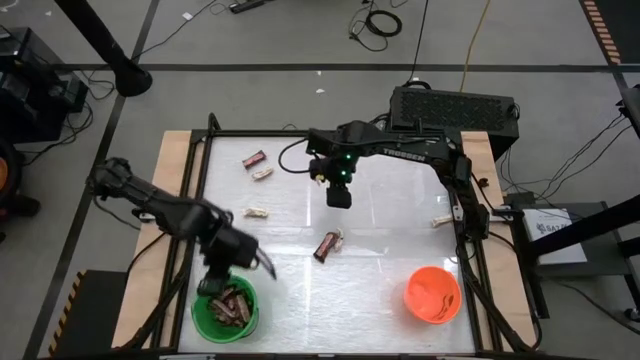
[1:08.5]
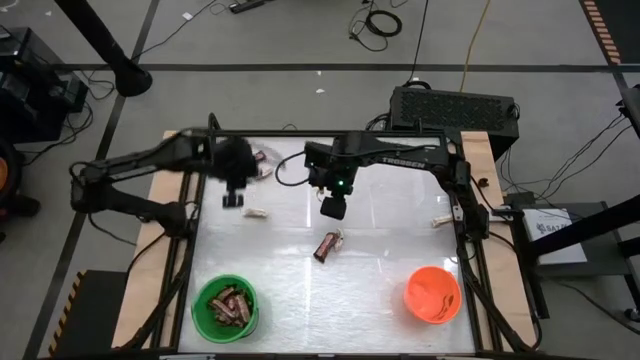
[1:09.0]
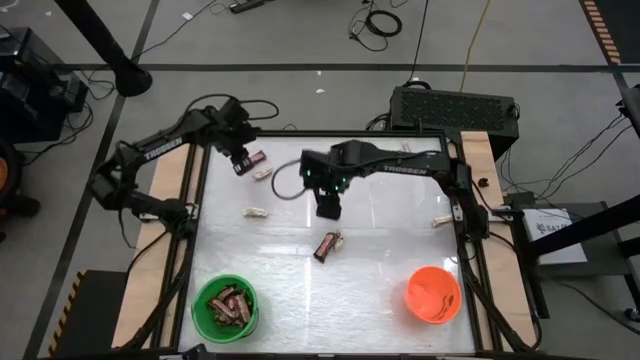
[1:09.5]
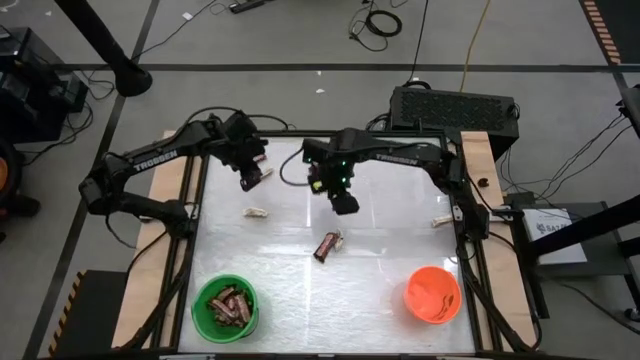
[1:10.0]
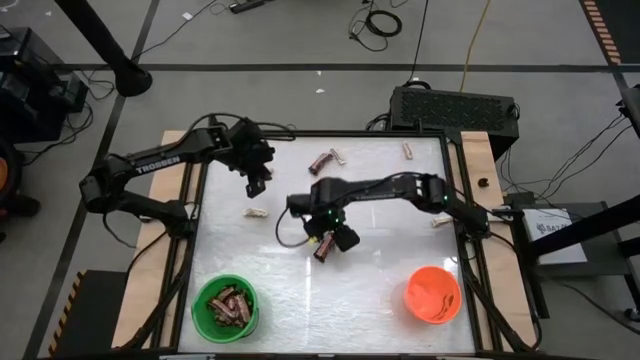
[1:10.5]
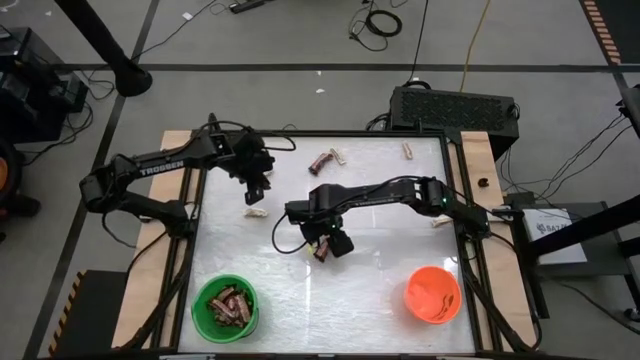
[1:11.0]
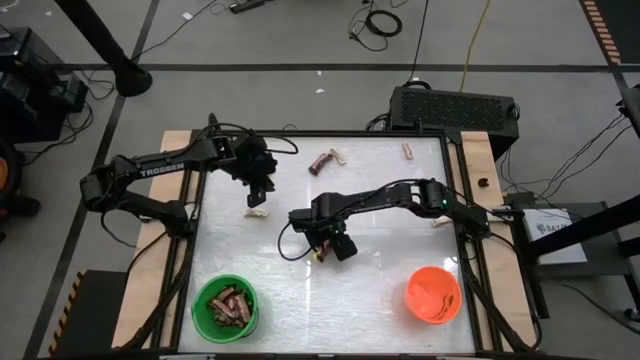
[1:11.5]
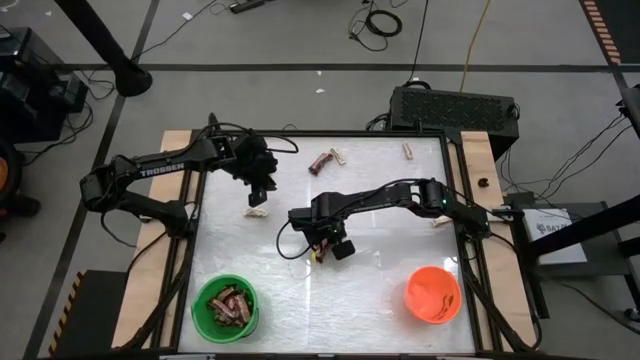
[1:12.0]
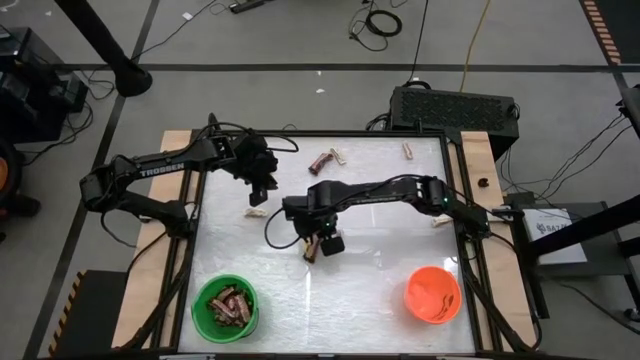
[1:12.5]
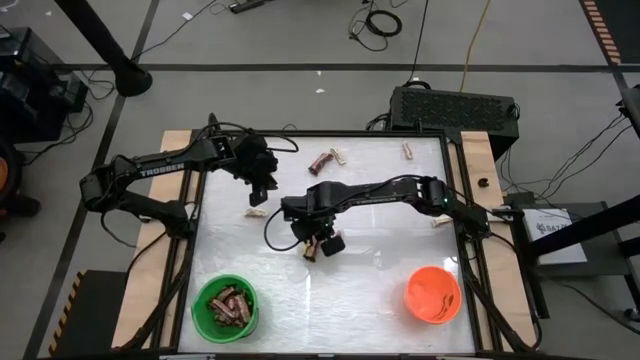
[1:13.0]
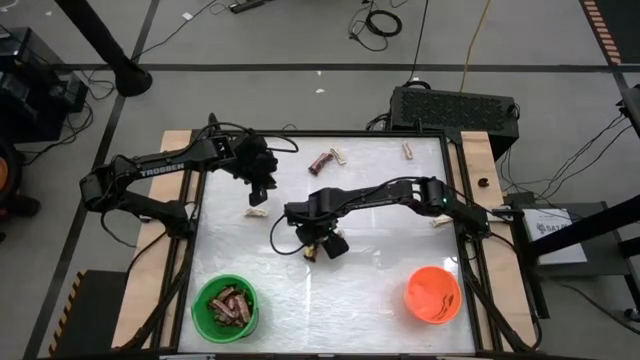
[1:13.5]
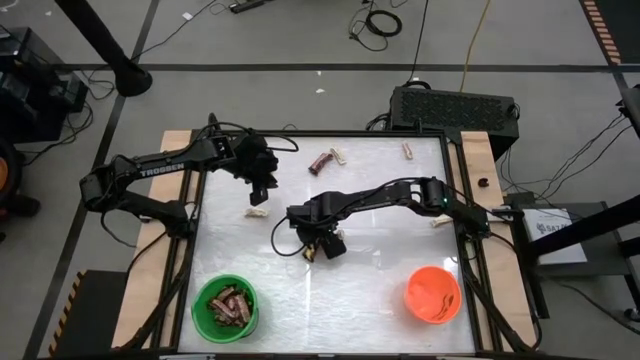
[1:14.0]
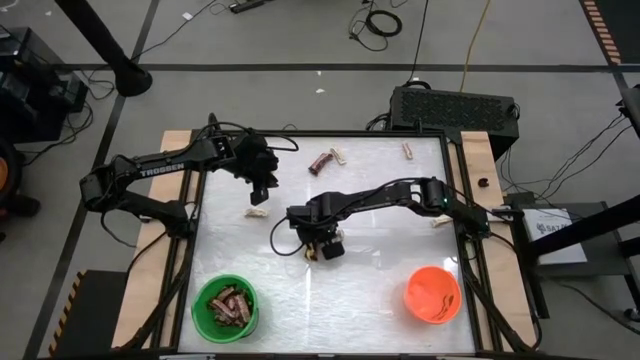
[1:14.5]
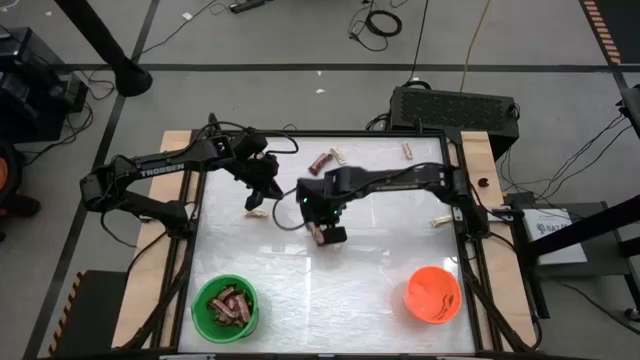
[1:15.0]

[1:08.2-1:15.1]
Task: Sort candy by brand, put in halloween buckets
Put the brown chocolate bar into the green bucket

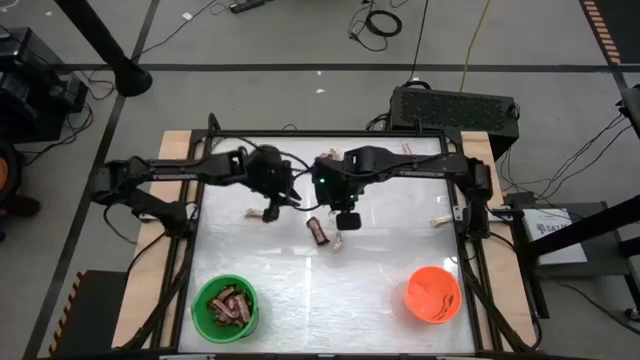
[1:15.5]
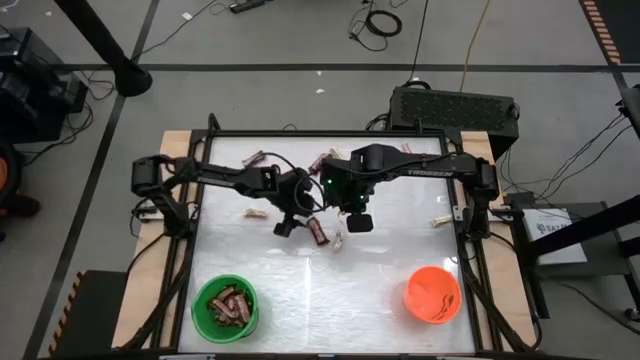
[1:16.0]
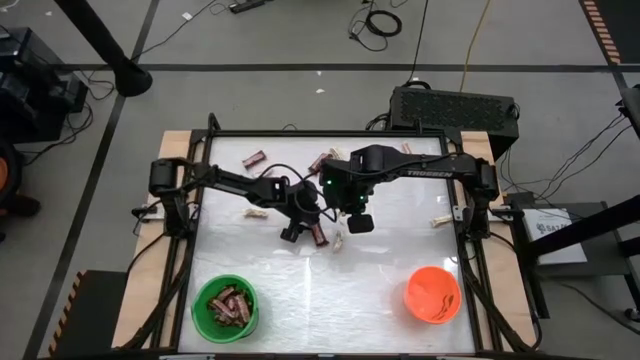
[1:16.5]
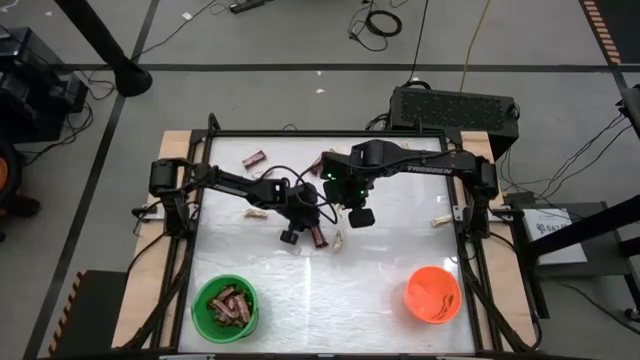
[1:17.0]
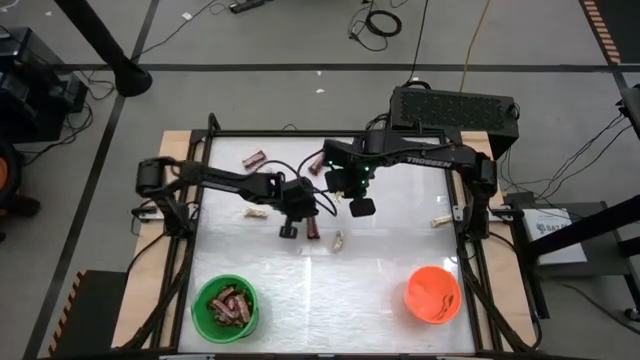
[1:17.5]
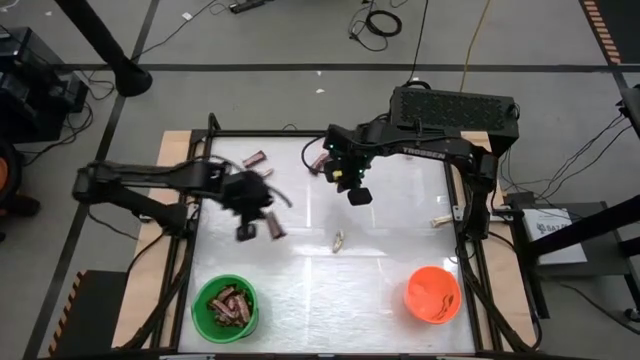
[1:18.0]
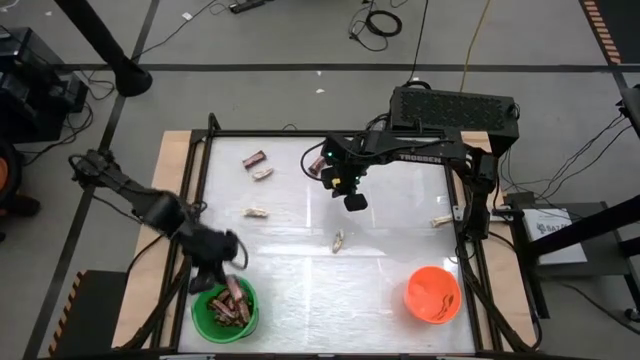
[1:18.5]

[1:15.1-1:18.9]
Put the brown chocolate bar into the green bucket

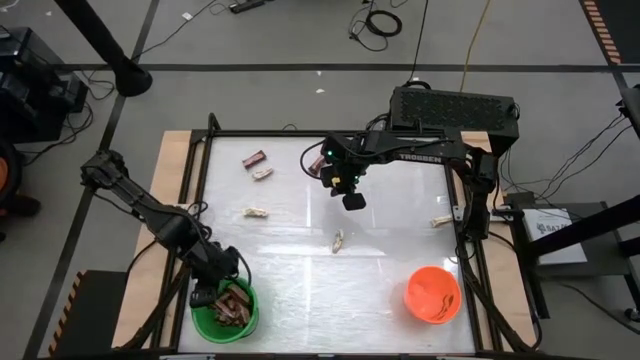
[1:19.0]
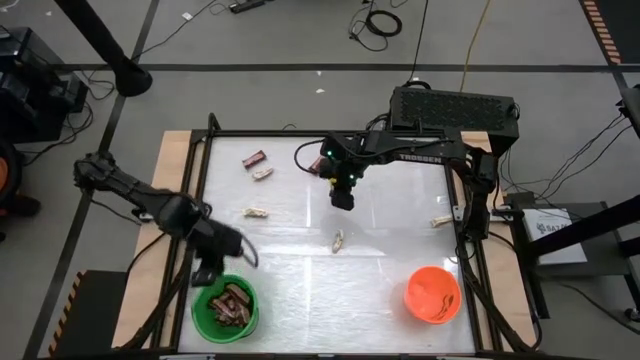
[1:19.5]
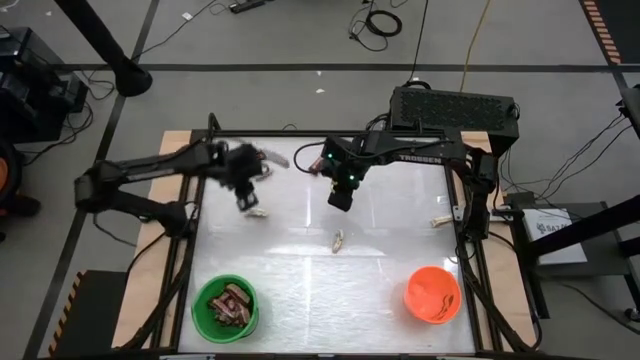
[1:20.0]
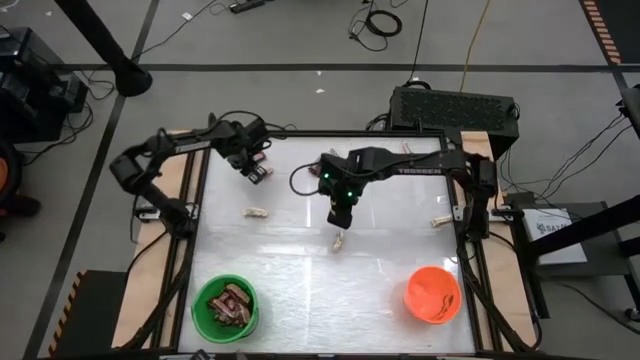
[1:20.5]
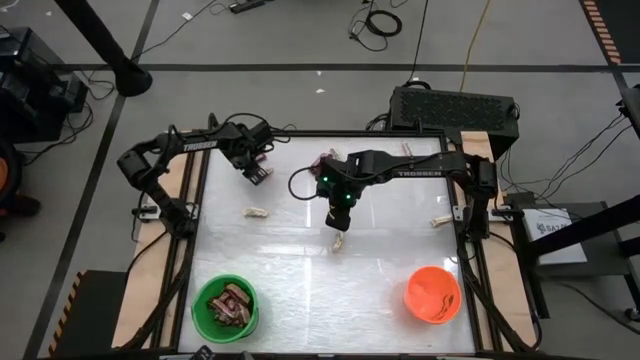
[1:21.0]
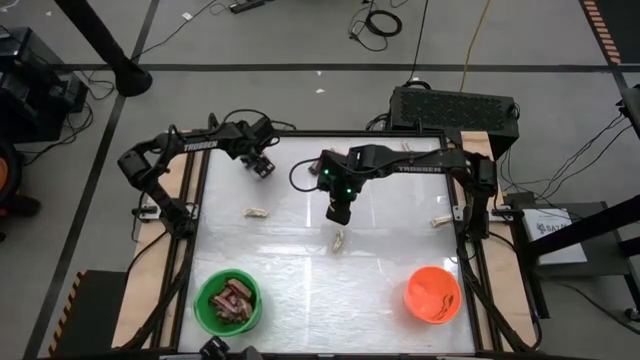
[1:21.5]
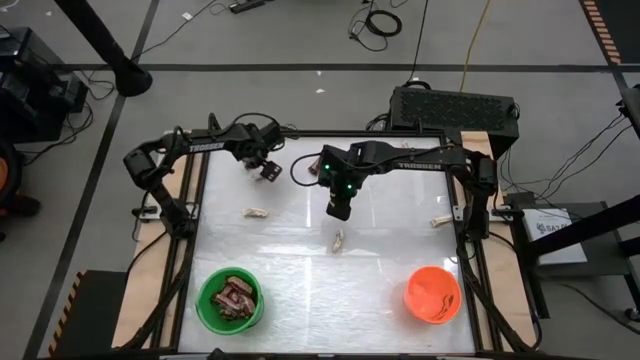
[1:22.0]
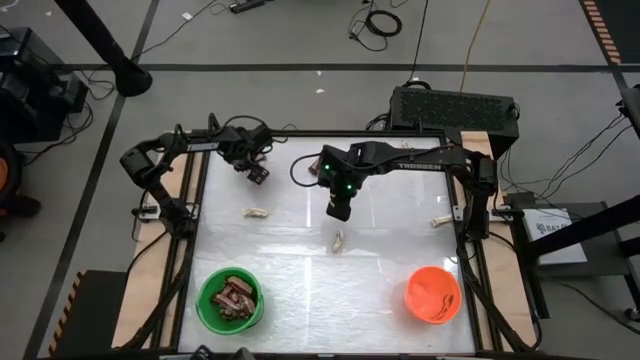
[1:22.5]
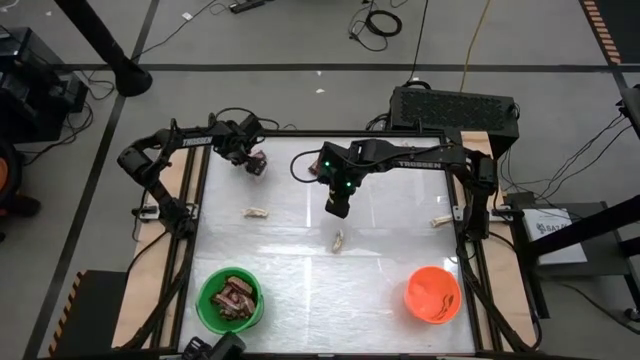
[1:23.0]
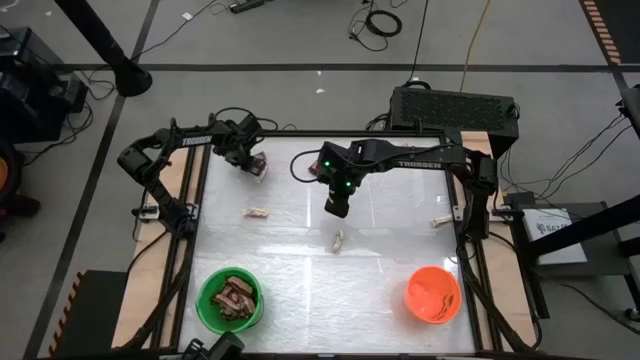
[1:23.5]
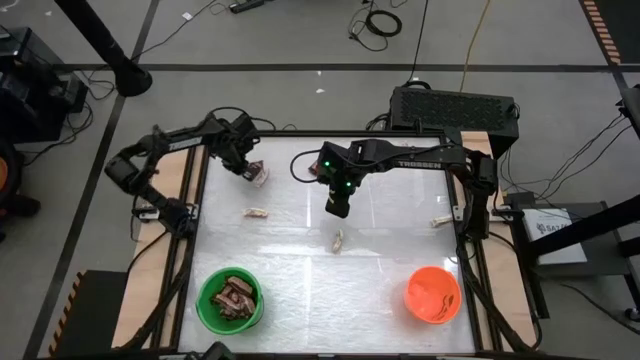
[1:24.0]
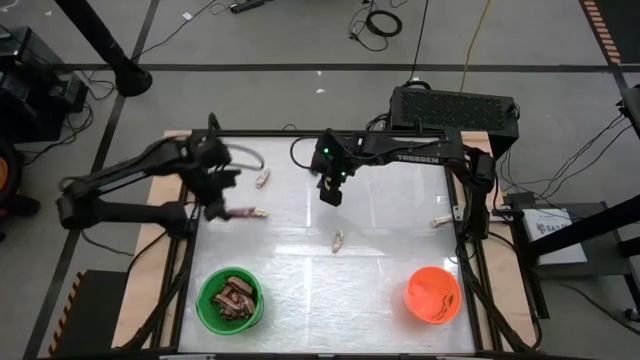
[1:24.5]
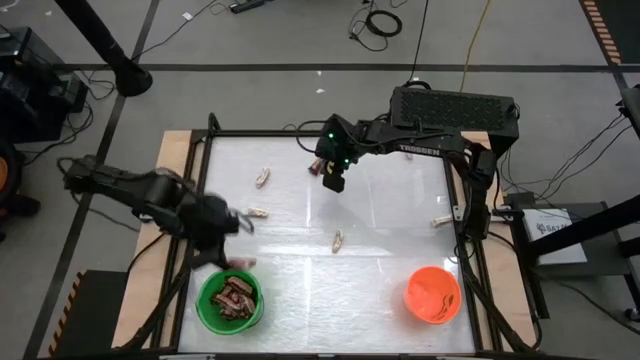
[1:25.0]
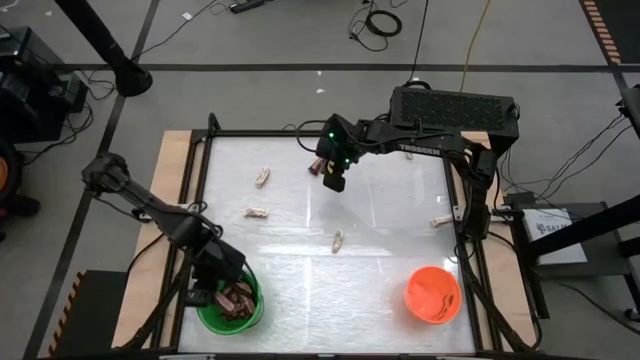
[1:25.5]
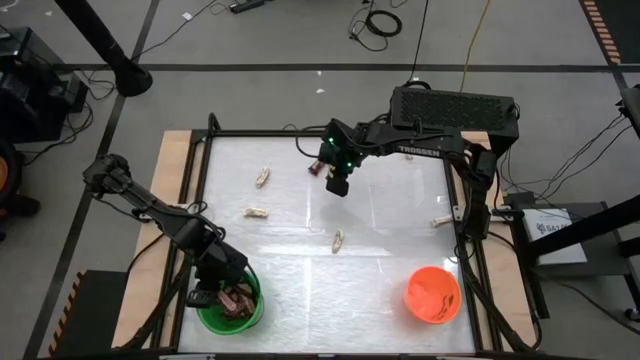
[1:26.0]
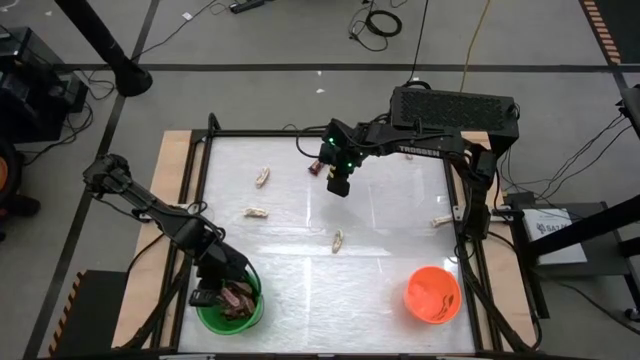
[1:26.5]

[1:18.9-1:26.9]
Put the brown chocolate bar into the green bucket

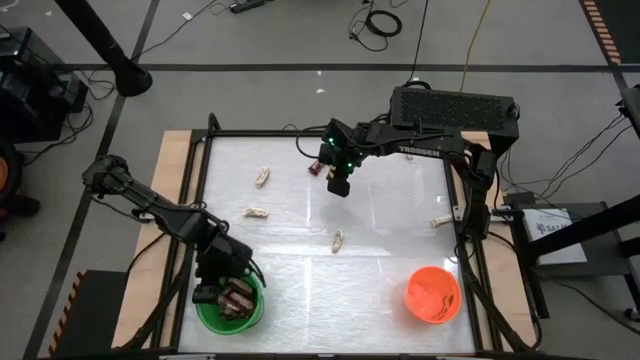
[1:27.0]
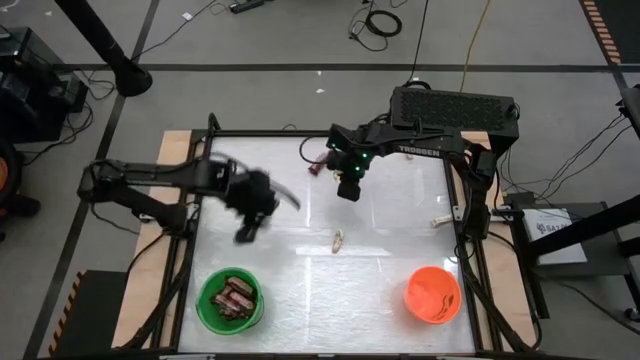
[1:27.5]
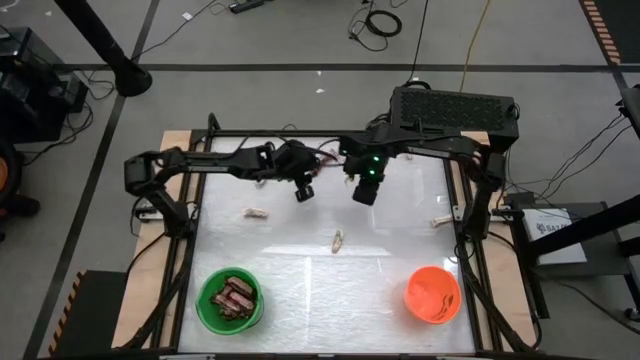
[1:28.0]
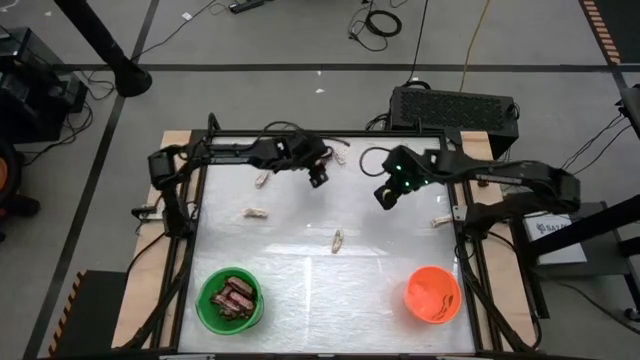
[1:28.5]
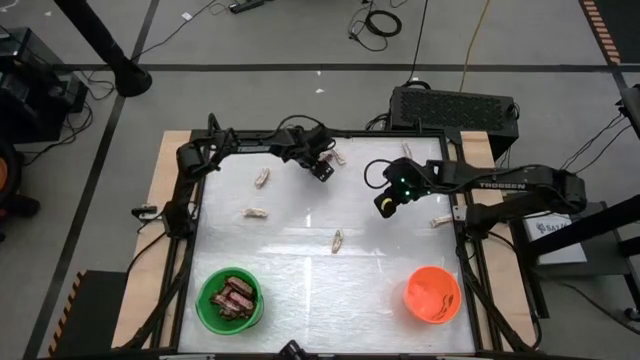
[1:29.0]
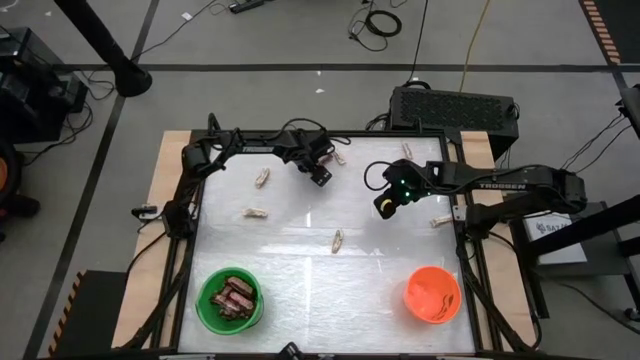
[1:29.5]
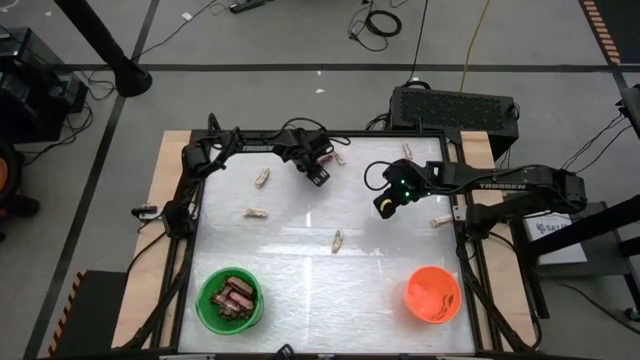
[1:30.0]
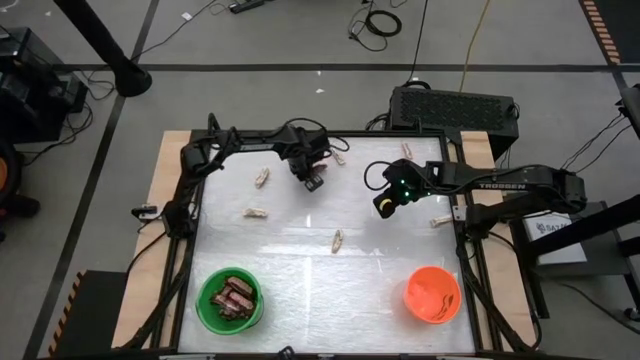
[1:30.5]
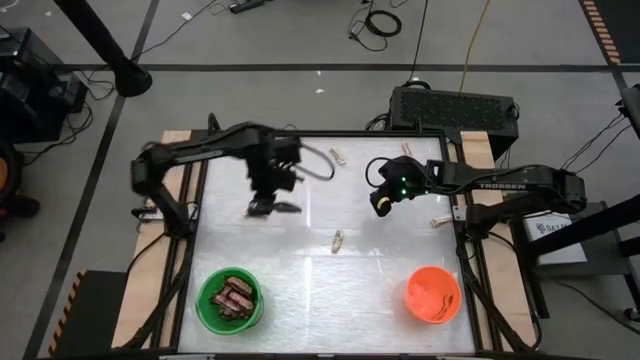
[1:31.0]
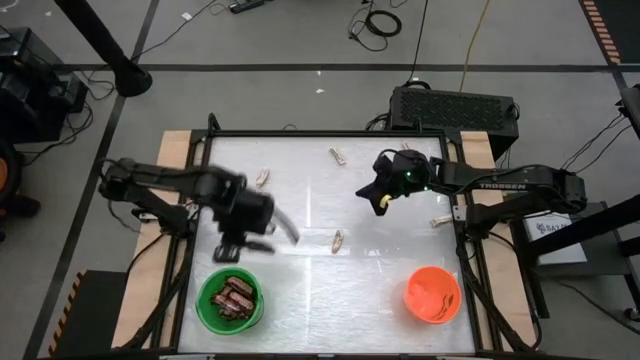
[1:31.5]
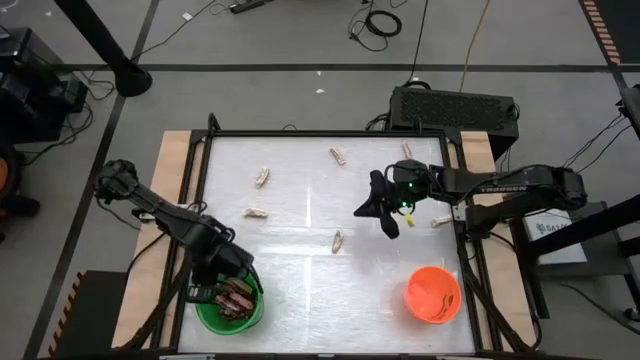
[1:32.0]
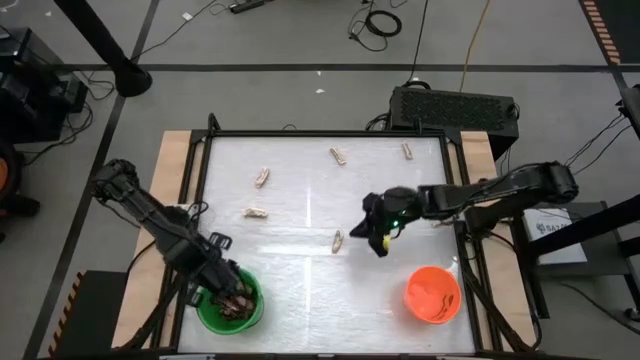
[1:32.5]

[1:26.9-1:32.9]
Put the brown chocolate bar into the green bucket
